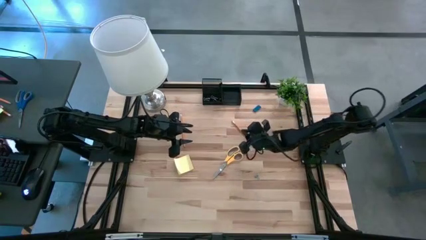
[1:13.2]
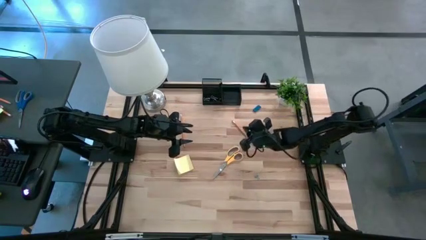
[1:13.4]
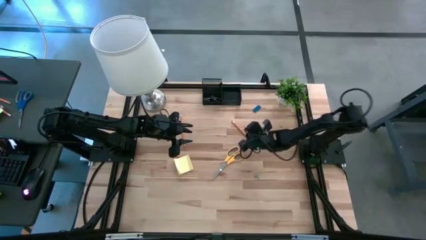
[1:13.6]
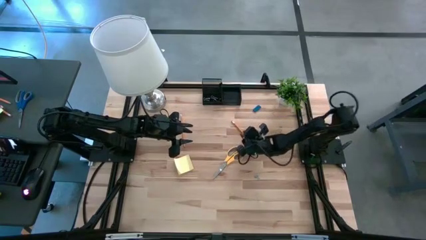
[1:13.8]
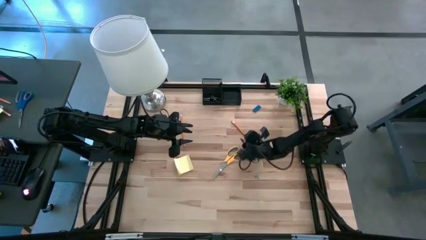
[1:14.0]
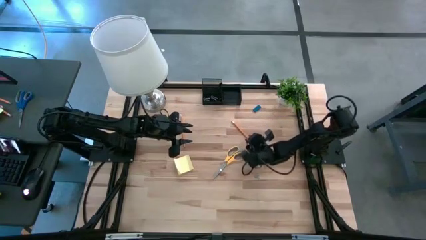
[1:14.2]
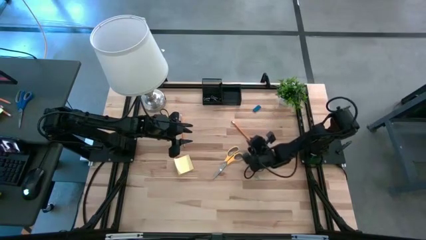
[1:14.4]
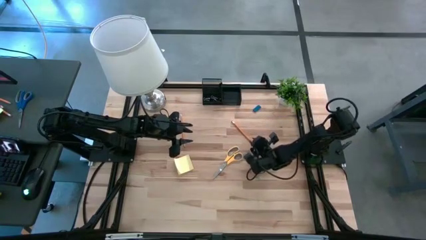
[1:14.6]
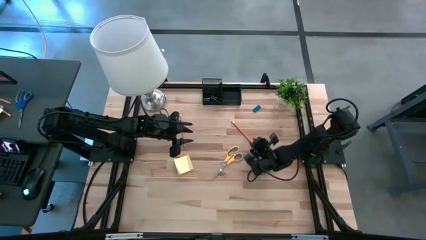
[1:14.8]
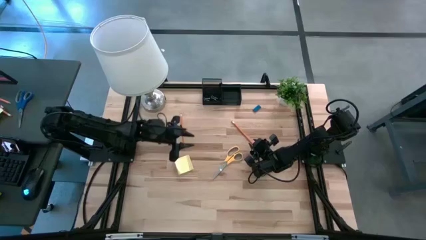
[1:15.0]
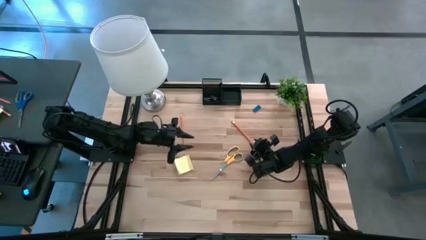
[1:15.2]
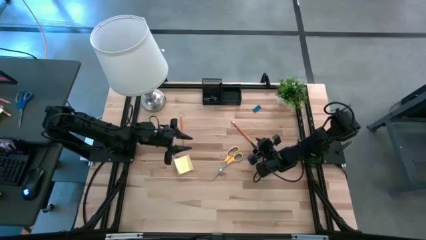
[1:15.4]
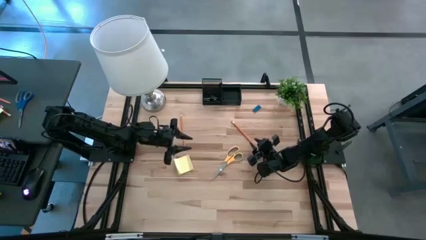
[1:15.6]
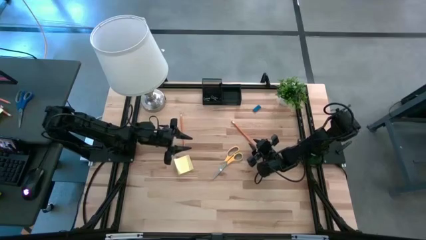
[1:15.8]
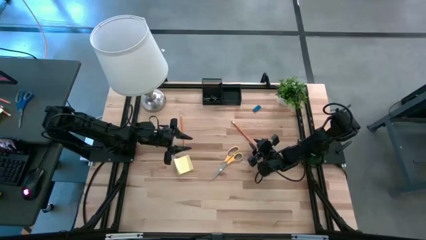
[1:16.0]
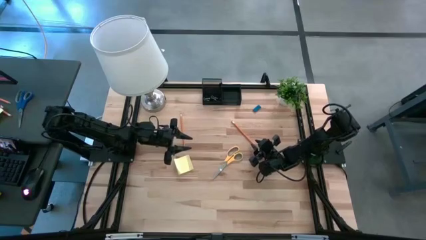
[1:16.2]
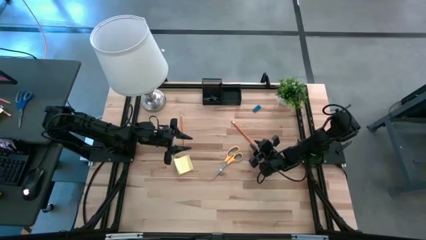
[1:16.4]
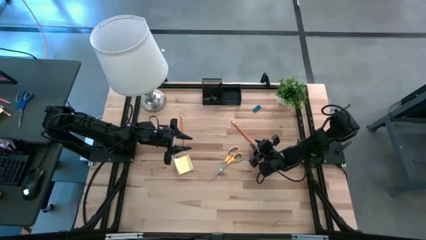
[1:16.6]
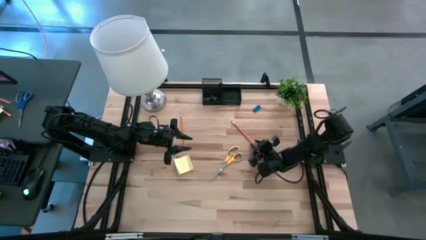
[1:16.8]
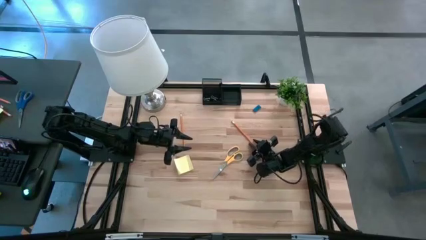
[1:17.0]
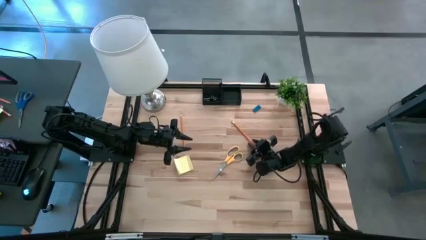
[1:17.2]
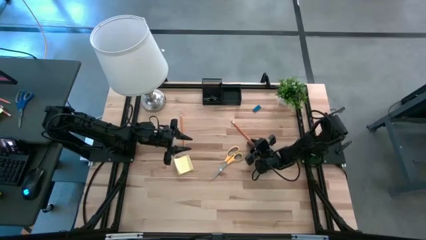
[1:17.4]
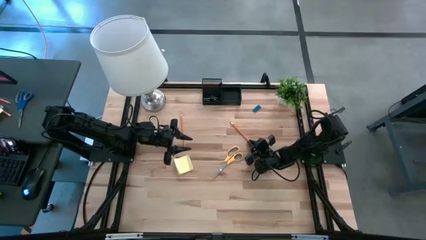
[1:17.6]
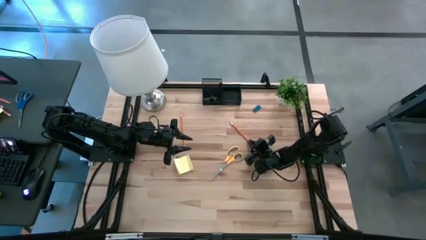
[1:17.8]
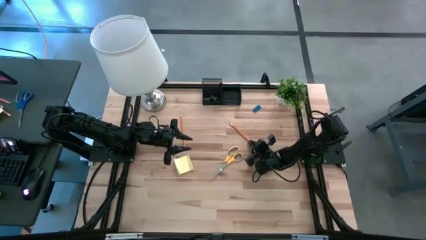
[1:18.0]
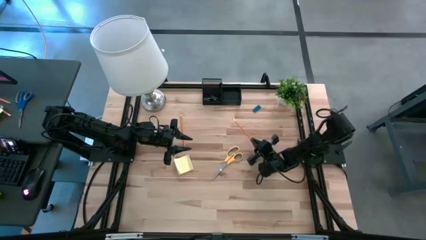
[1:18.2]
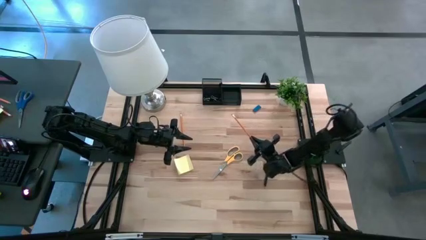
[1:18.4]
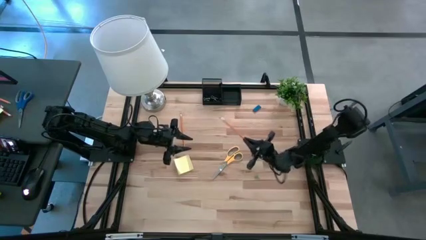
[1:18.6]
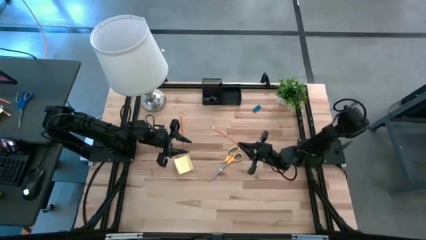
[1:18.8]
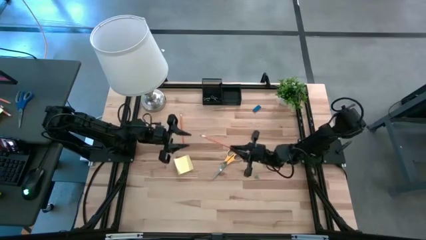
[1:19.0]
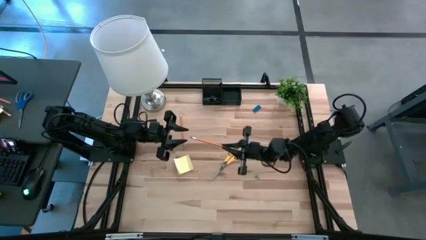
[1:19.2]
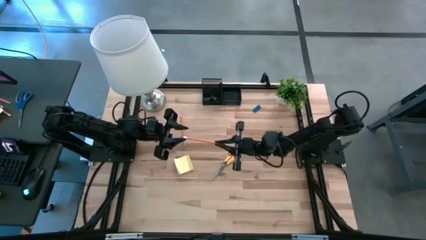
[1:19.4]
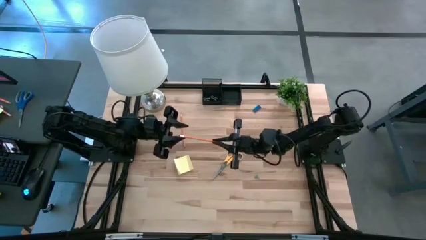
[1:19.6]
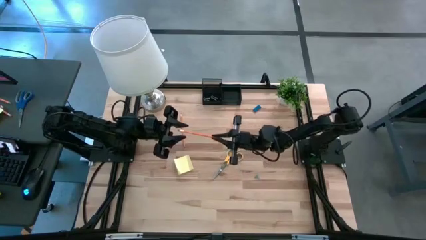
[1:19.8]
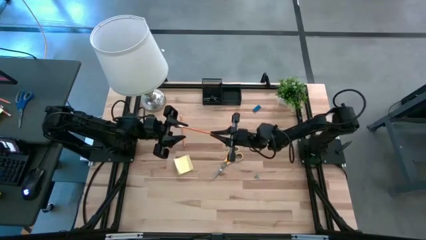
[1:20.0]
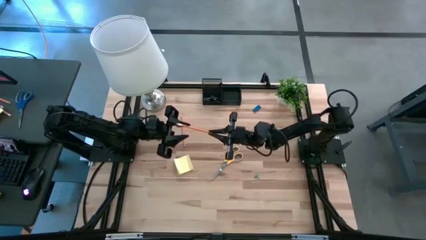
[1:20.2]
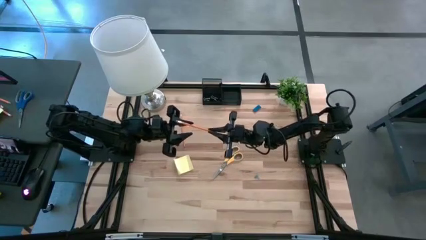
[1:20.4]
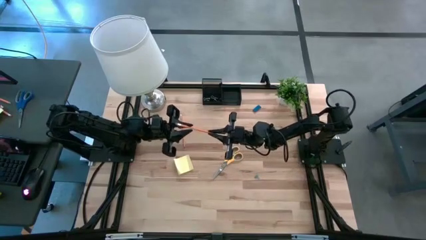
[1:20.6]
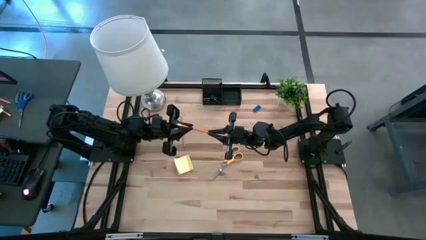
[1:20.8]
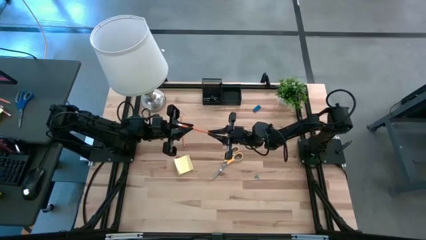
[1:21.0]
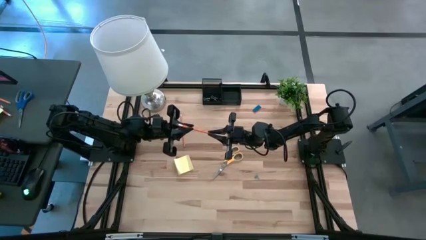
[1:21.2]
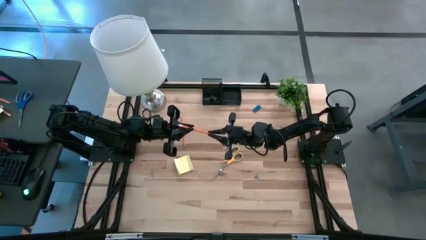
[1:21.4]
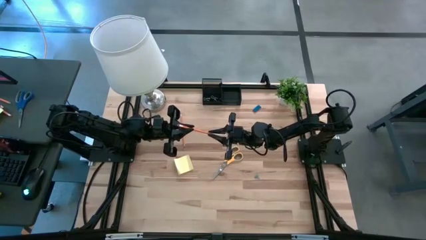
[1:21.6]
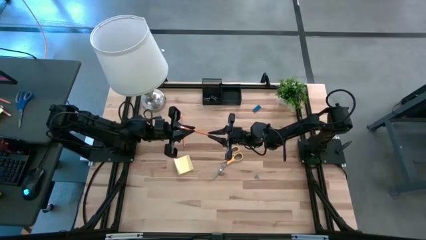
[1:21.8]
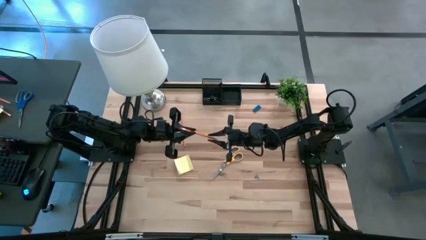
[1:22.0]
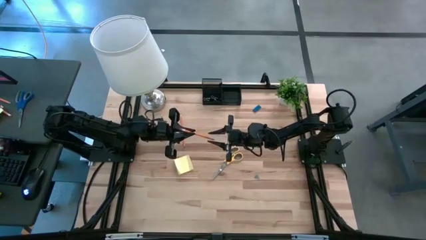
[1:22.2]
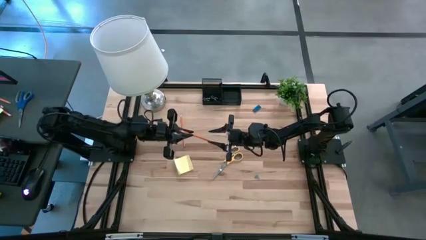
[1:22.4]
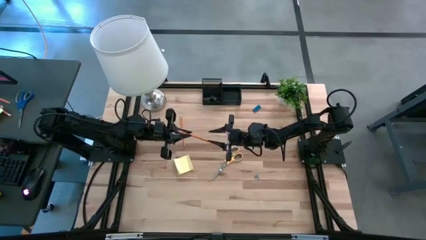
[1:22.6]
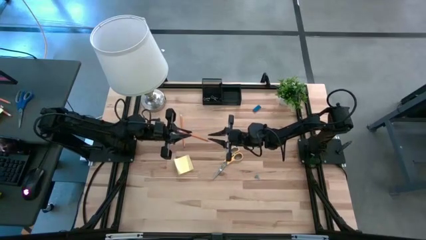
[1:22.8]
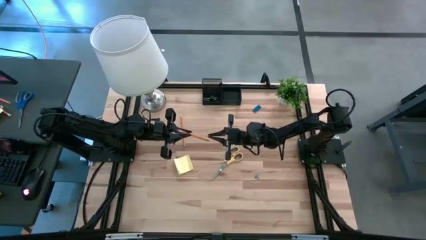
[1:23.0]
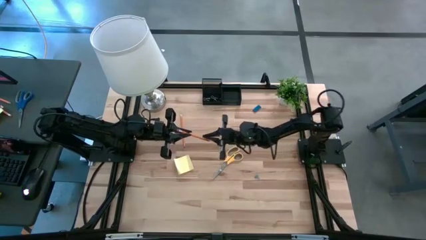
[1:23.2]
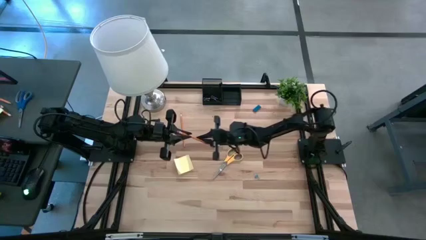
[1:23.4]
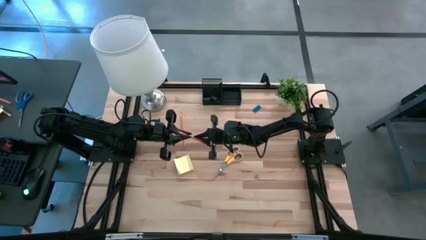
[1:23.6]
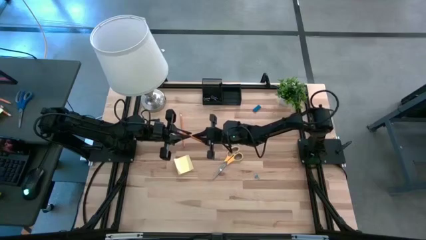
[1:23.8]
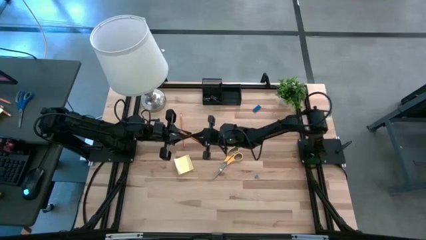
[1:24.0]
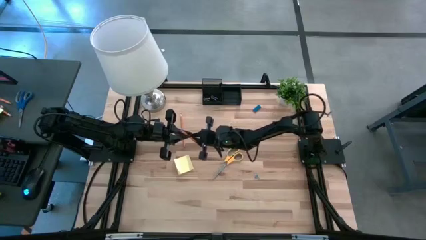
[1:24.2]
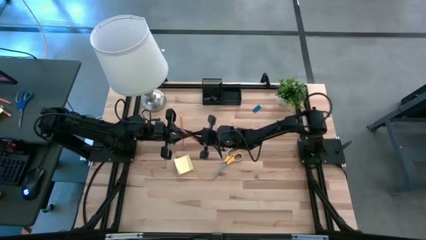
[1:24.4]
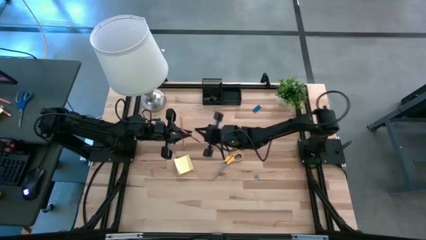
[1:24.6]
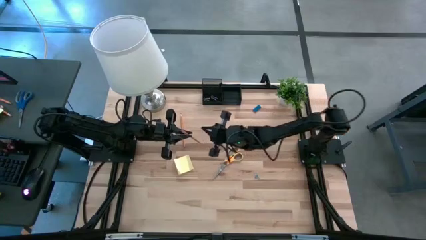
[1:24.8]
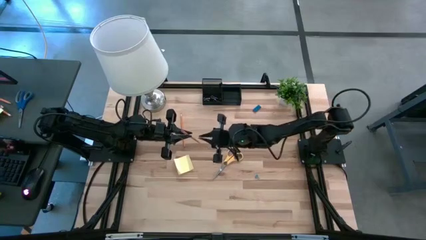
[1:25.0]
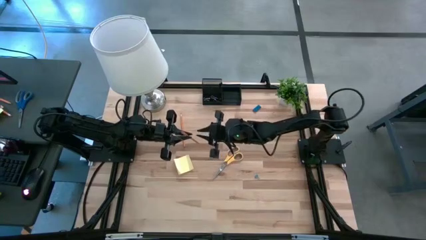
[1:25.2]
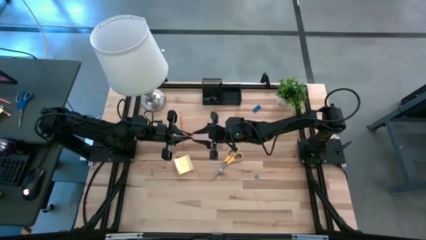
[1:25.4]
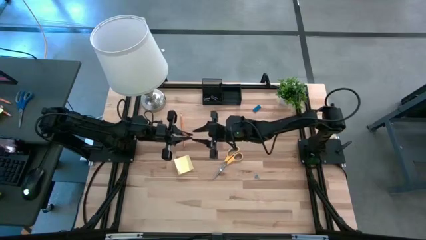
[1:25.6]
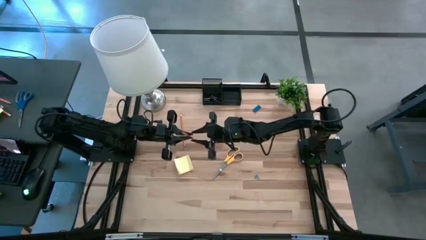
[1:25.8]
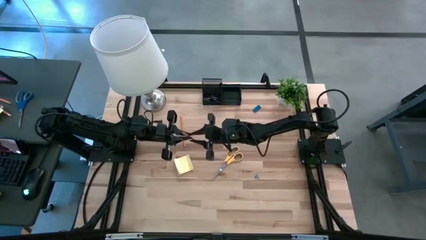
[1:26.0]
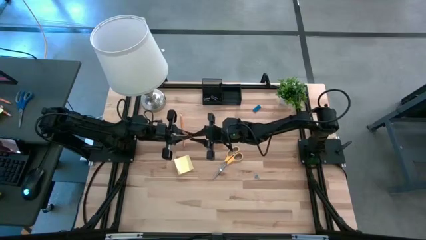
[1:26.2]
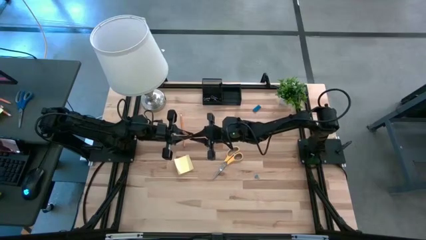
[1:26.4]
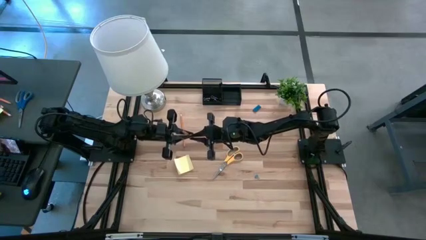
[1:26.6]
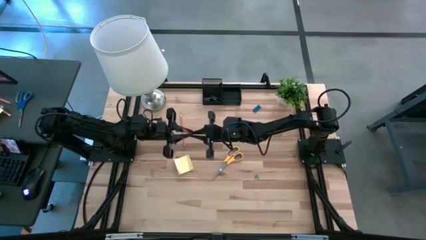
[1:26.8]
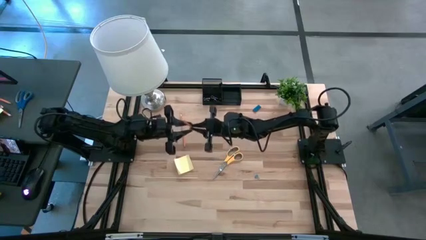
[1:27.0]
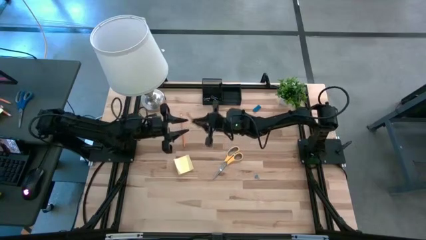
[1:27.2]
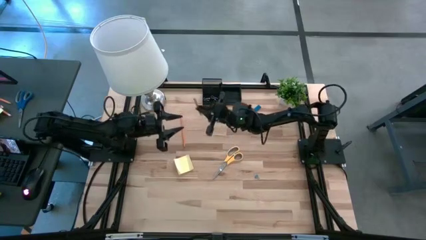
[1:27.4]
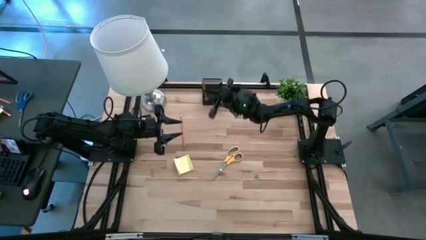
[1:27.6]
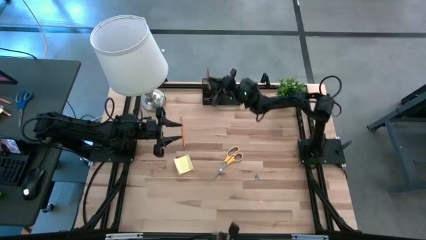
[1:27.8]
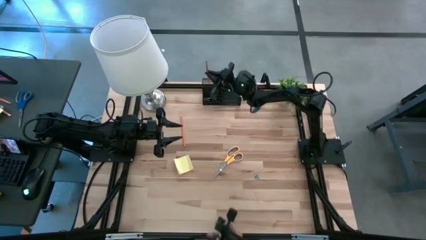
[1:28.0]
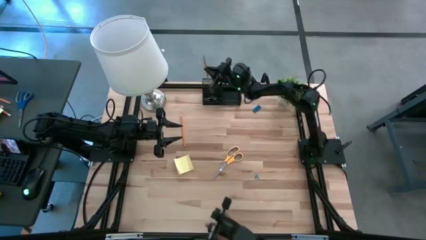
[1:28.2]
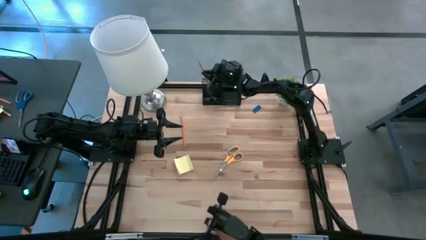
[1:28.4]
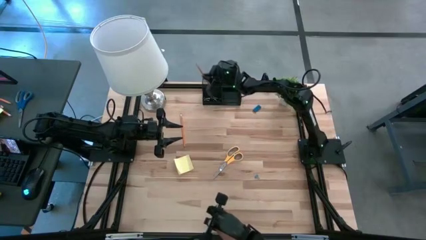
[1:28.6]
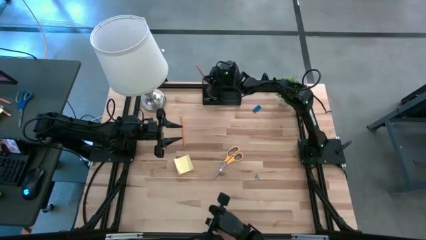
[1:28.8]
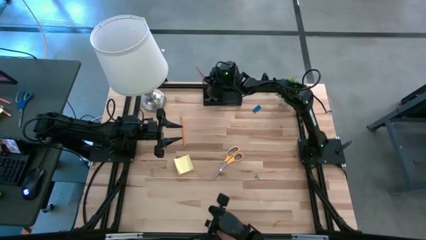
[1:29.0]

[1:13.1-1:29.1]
Task: Pick and place office supplies into organizer
Put the right pencil into the desk organizer
